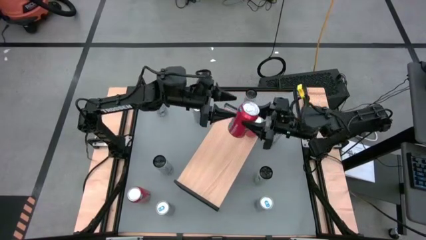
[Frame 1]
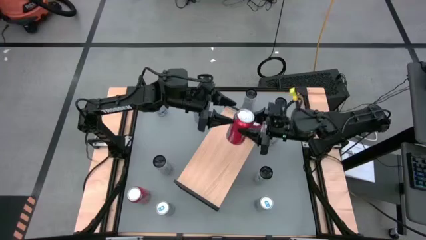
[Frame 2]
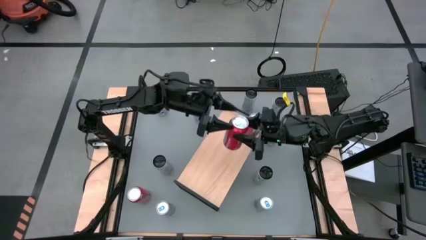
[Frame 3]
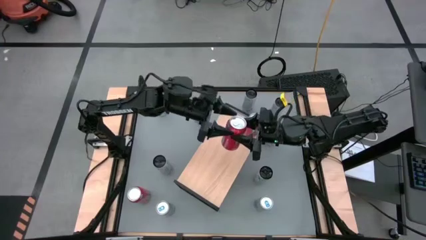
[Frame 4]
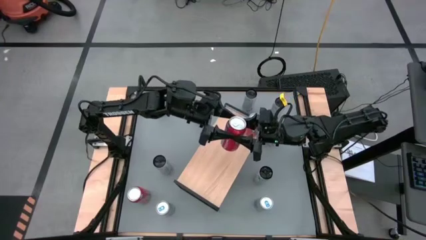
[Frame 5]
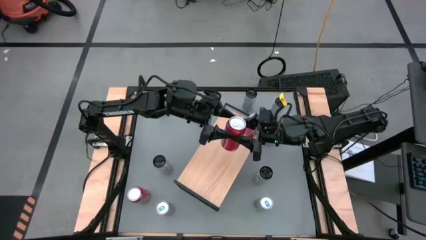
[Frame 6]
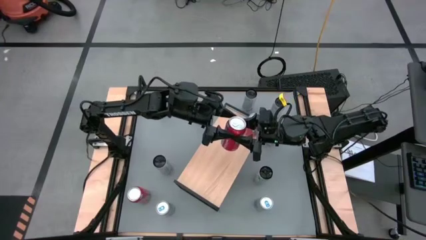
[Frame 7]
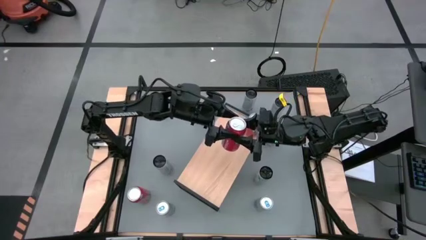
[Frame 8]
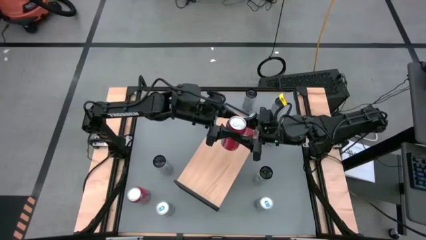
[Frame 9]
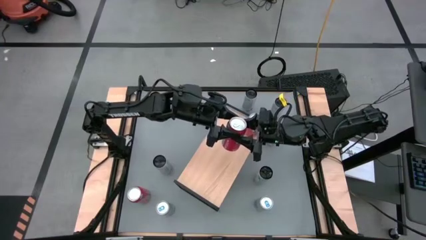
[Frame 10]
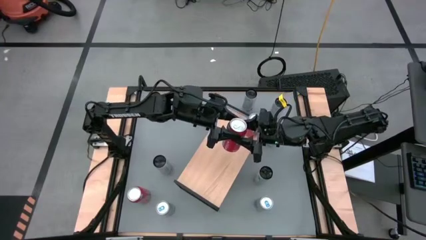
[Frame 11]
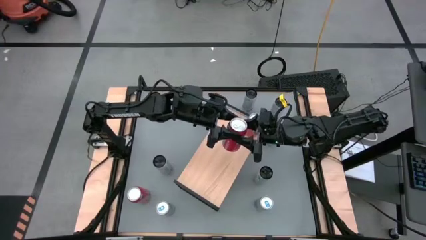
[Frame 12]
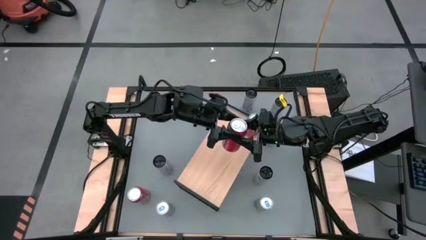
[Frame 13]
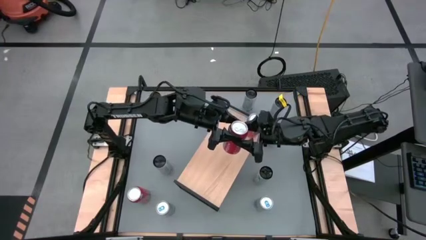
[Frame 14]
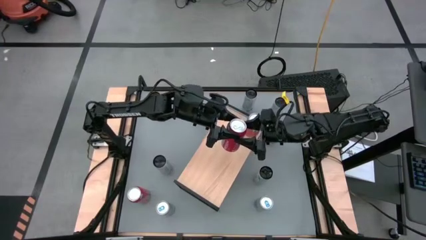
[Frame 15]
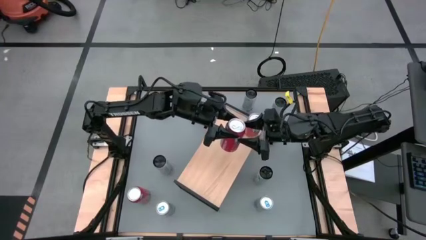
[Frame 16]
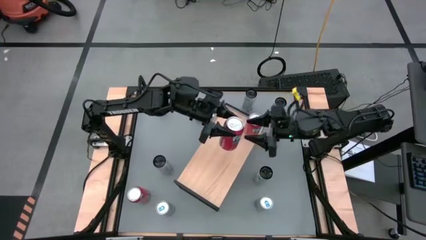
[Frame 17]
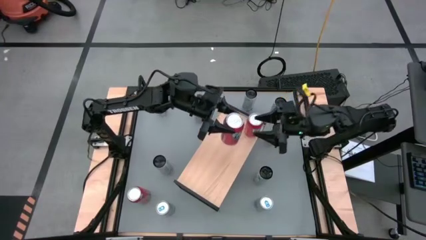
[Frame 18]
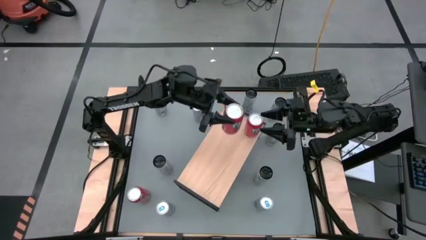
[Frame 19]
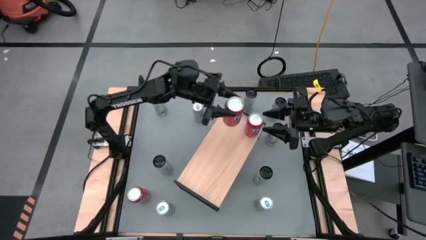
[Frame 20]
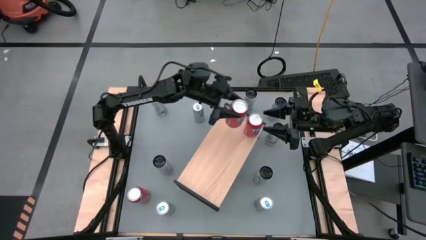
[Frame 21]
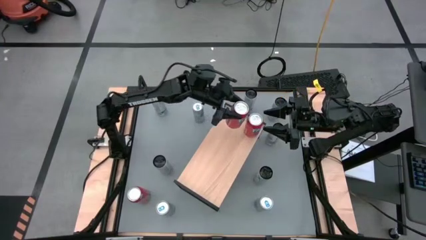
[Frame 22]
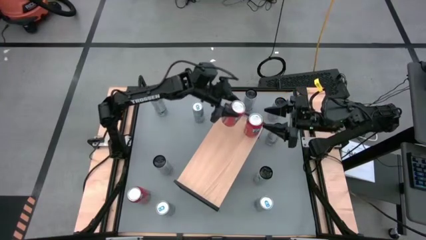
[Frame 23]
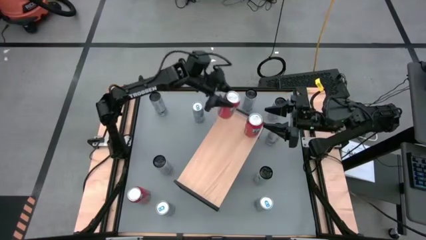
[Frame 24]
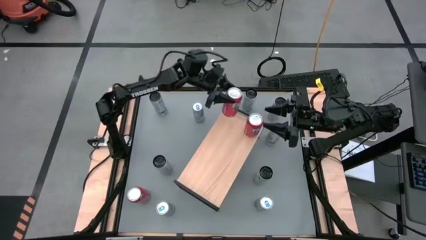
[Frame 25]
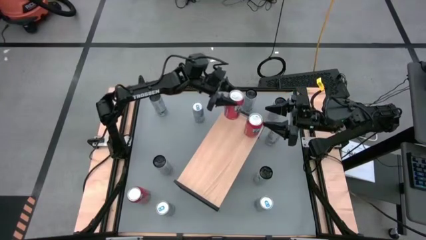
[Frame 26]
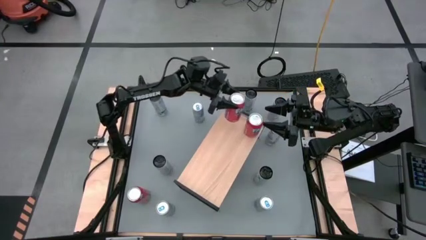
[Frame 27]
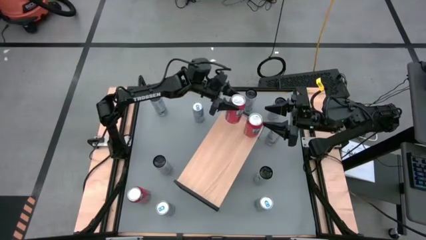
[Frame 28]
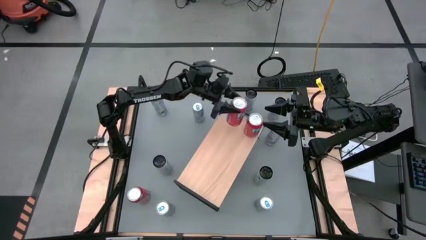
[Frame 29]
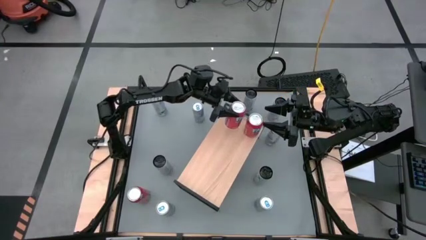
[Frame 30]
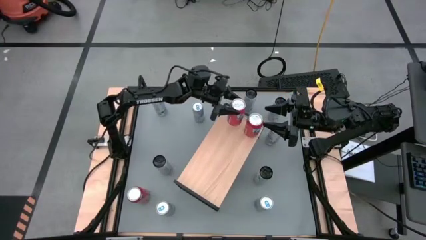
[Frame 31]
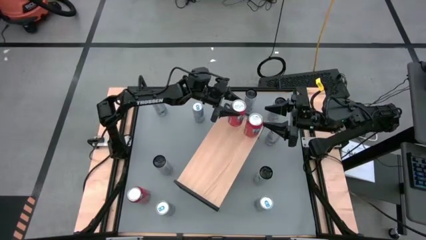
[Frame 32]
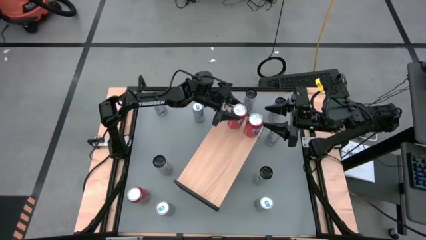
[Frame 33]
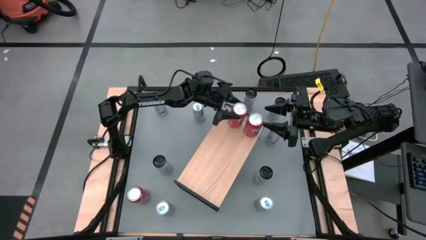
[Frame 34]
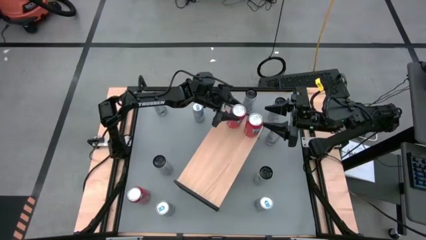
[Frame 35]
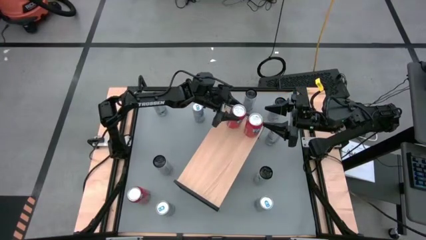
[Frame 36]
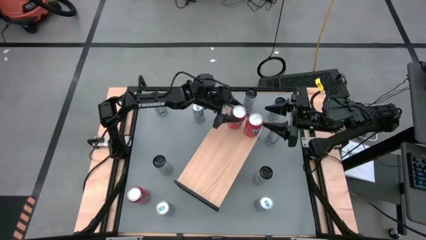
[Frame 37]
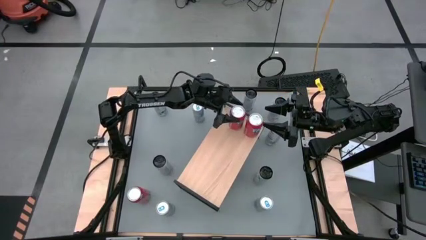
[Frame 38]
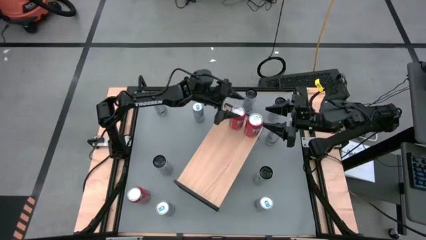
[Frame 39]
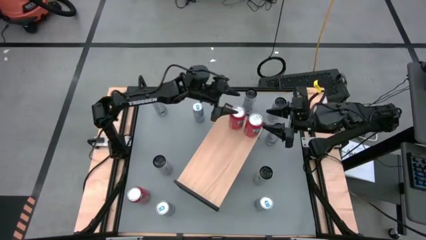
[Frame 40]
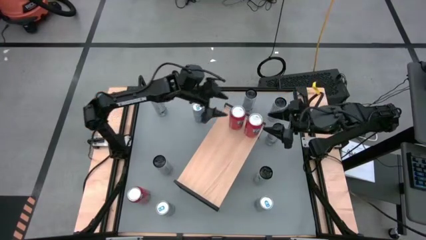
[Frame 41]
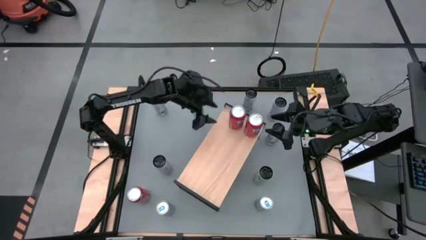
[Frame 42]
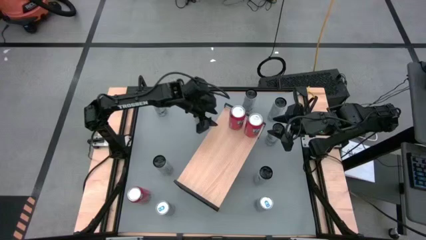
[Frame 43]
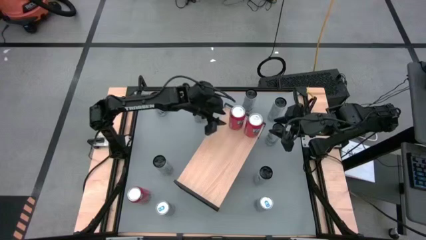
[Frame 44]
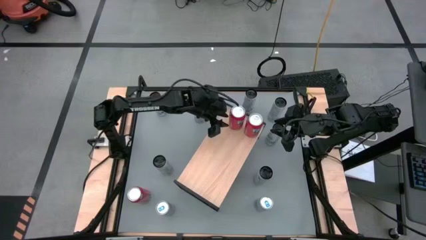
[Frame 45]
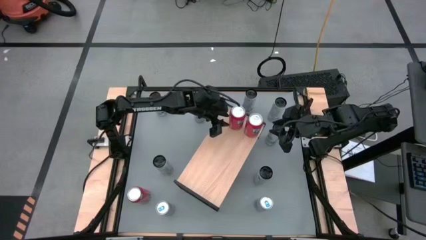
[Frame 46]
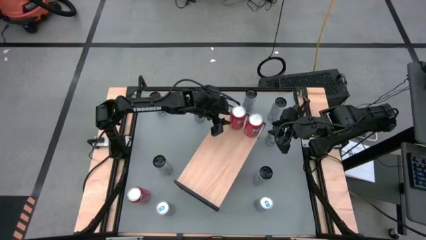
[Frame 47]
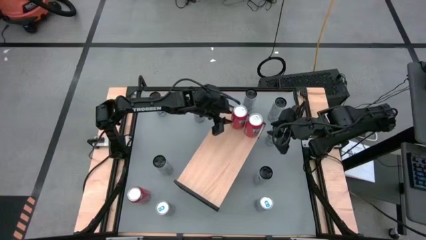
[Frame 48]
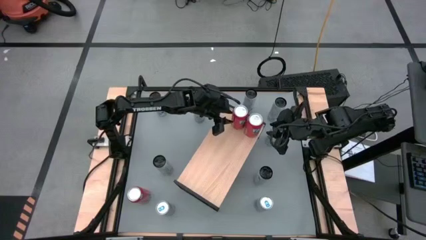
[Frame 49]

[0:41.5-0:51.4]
Task: Place canned beverage on shelf
Put the red soda can on the shelf aligned with the other red soda can

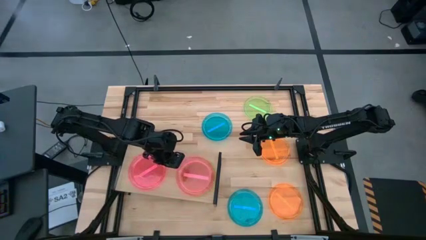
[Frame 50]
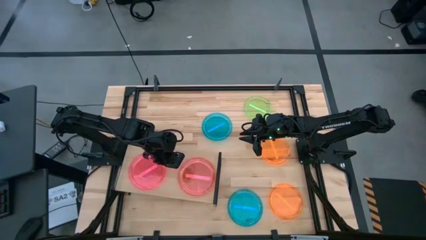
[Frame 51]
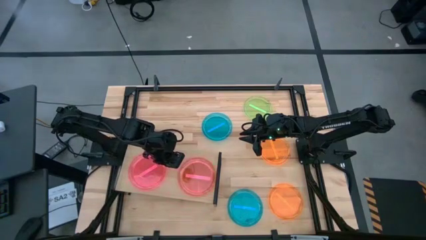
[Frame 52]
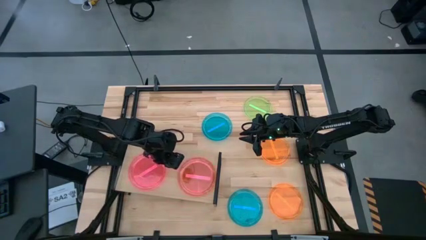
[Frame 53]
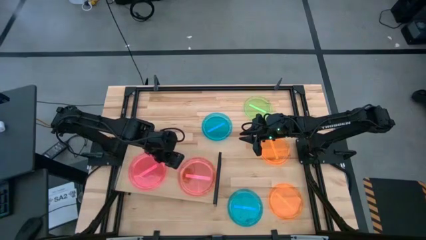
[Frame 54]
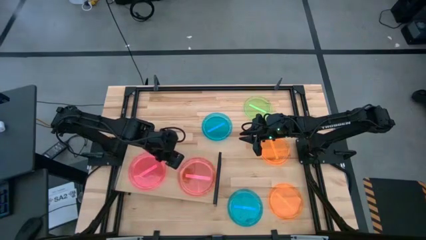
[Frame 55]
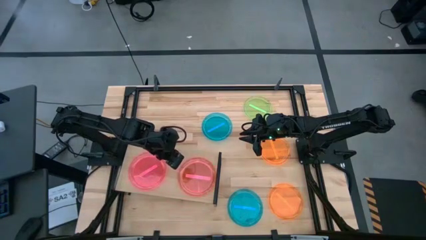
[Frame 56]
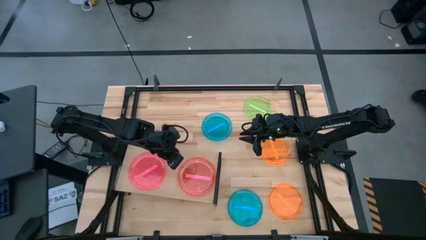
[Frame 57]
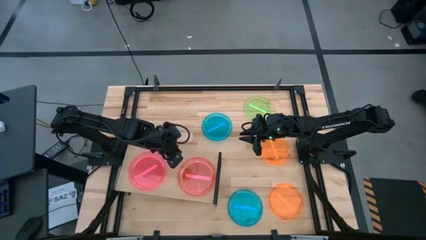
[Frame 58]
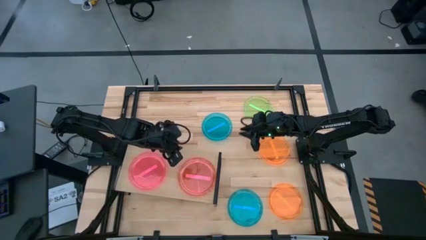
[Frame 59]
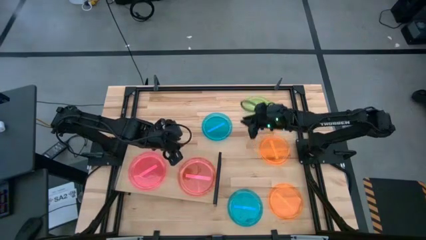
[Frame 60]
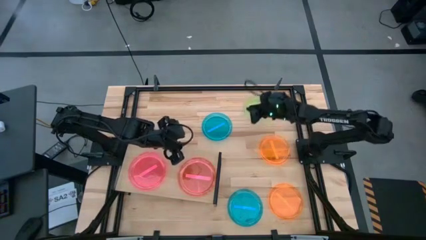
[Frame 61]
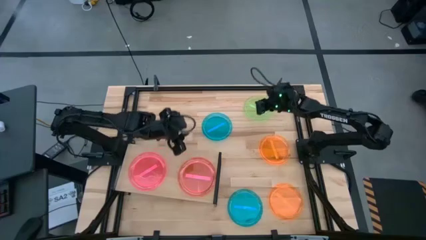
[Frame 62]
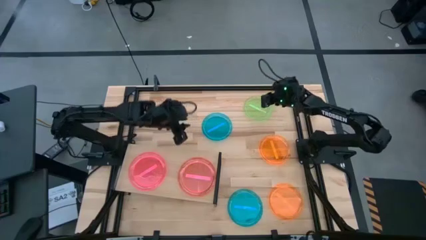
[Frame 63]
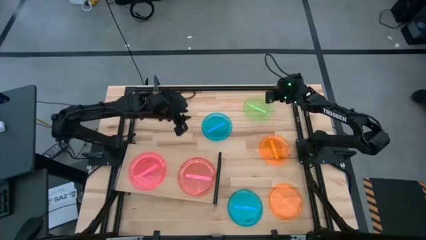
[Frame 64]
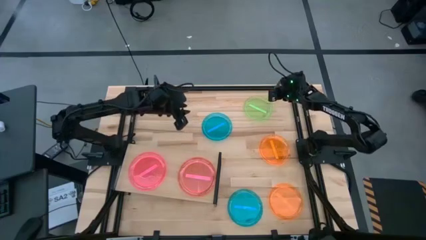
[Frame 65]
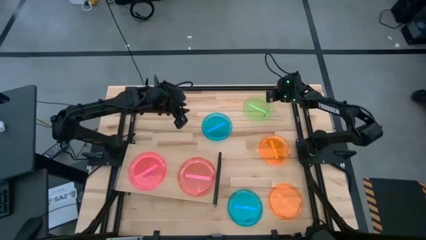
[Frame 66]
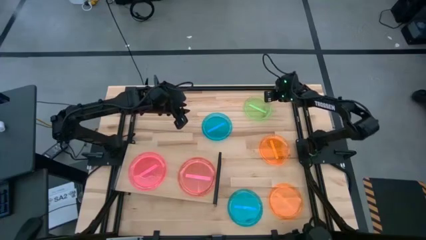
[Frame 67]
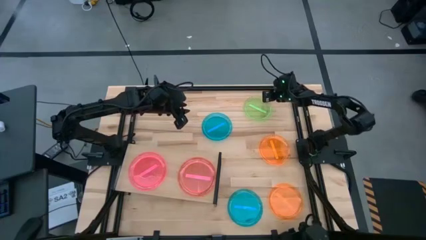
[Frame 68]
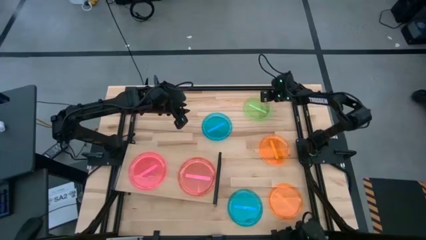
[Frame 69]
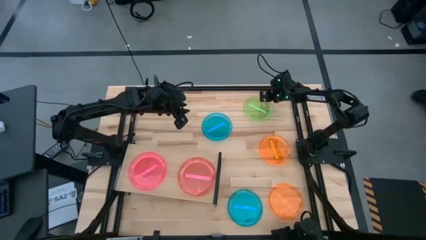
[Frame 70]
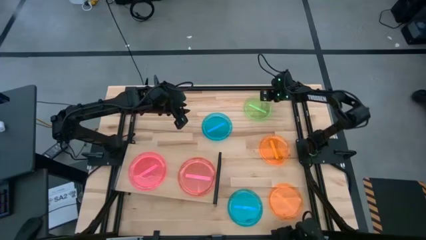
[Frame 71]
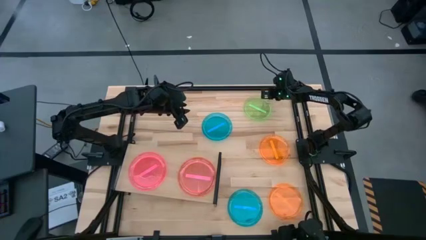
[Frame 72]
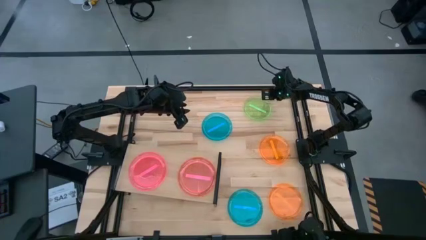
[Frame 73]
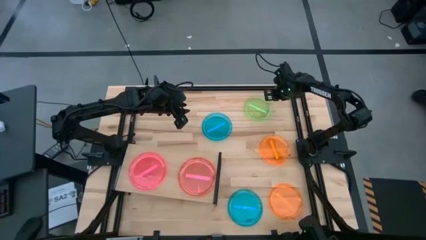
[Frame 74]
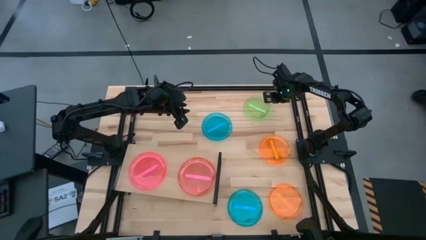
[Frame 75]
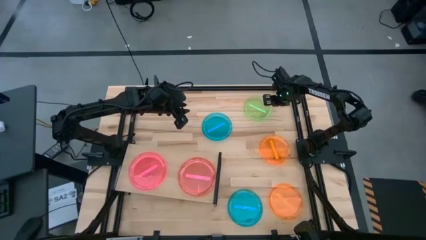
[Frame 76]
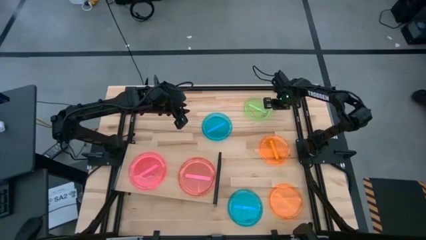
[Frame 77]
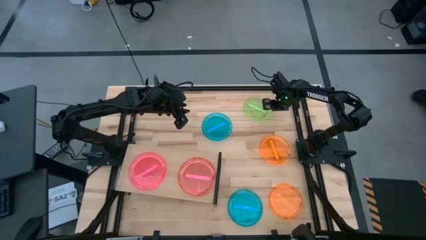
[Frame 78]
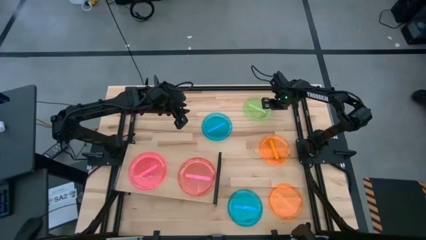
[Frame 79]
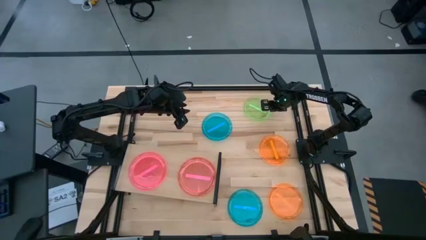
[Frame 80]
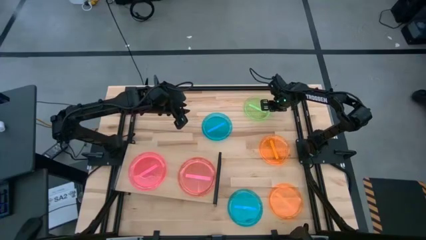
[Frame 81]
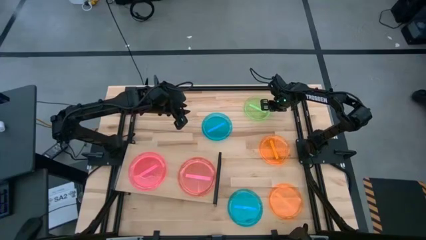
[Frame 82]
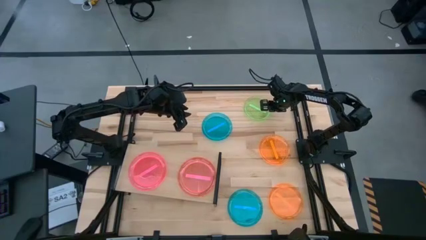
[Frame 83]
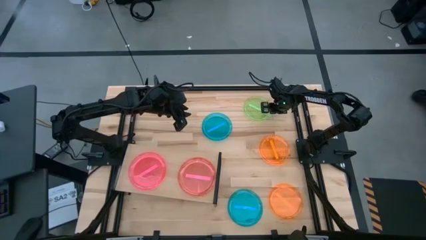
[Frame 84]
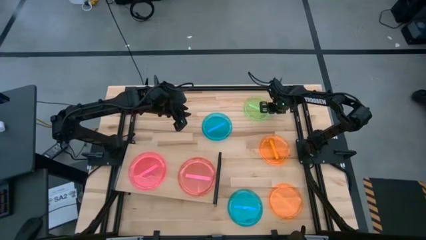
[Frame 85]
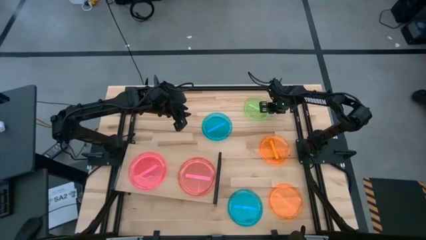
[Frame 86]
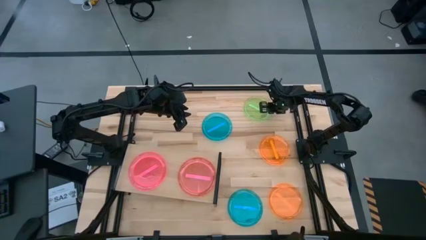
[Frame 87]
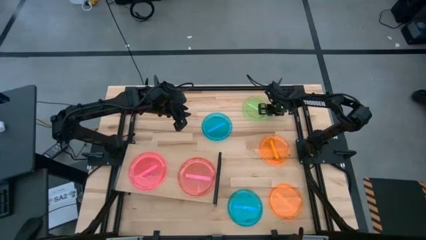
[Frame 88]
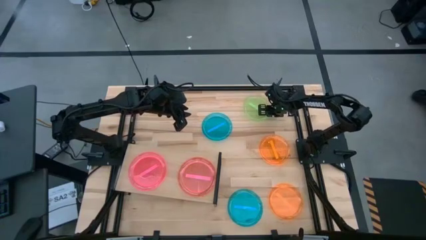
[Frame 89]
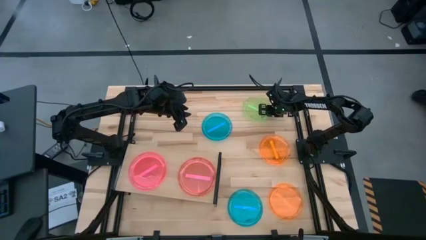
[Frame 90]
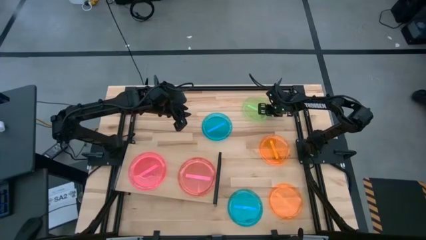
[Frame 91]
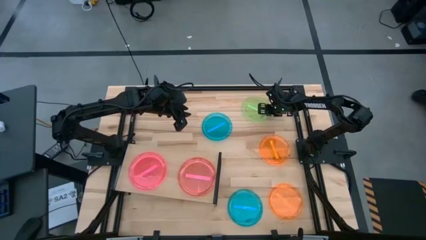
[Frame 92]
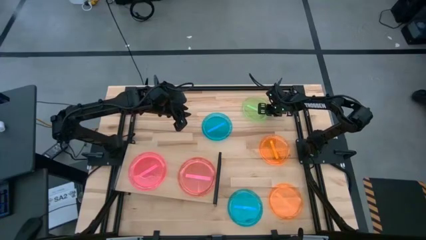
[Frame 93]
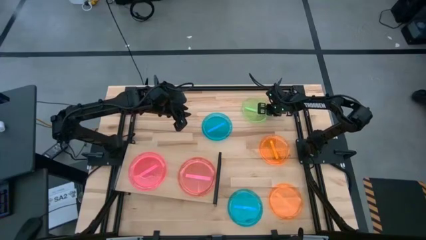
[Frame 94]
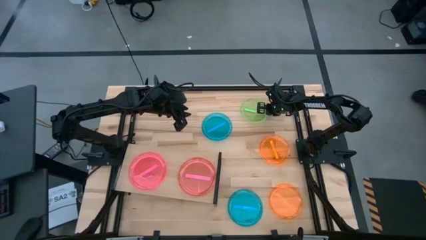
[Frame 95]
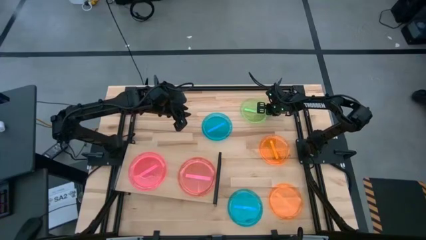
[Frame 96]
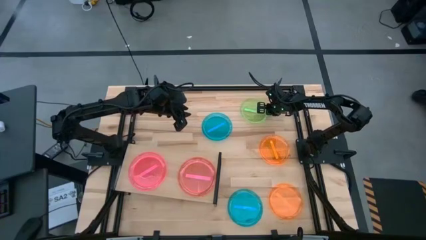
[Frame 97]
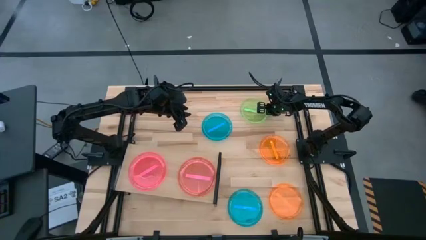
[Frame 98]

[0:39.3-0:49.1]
Task: Place and stack plates onto a shelf
Stack the green plate on top of the red plate on the shelf
